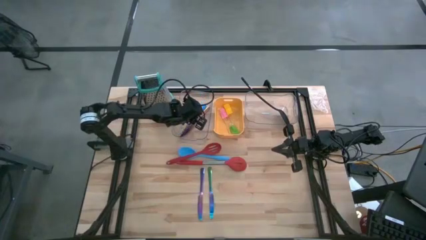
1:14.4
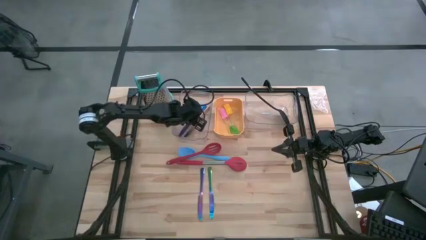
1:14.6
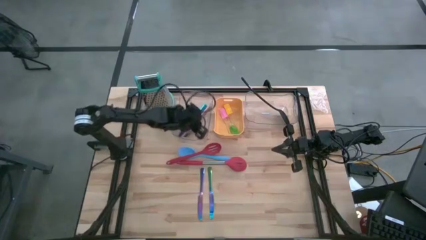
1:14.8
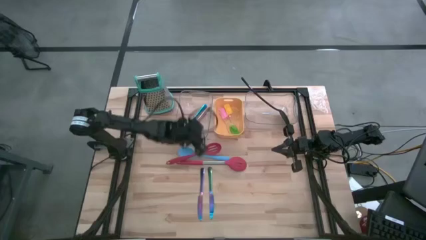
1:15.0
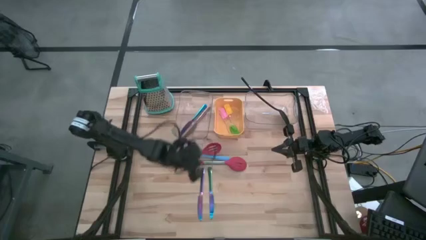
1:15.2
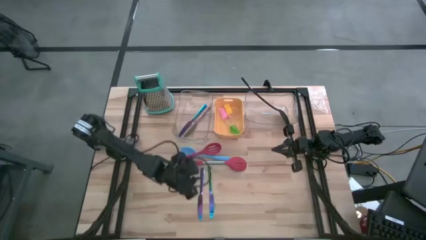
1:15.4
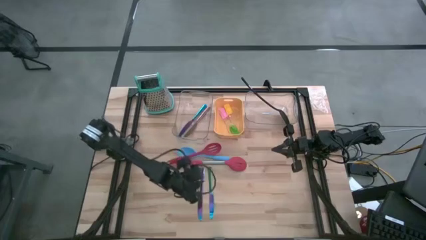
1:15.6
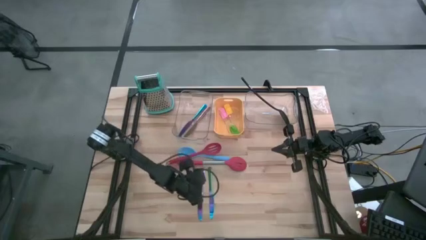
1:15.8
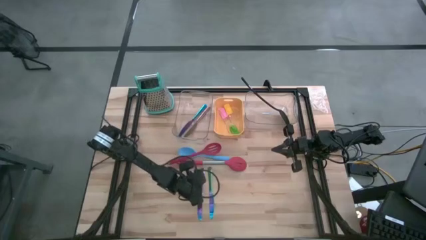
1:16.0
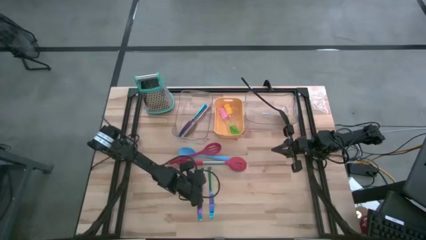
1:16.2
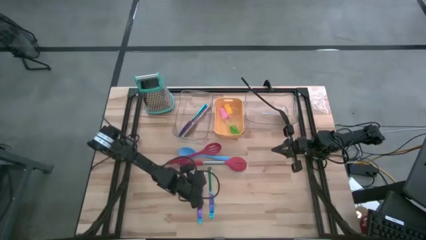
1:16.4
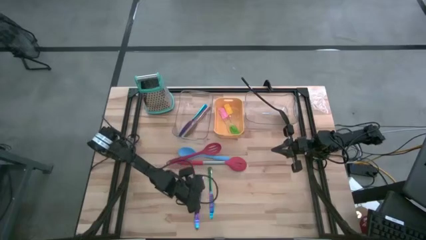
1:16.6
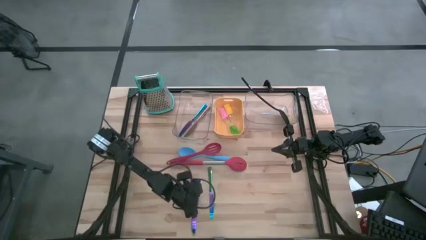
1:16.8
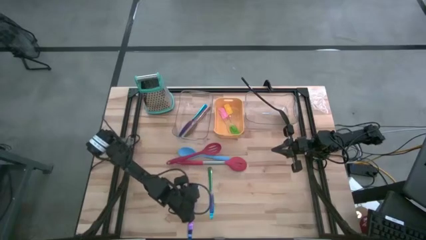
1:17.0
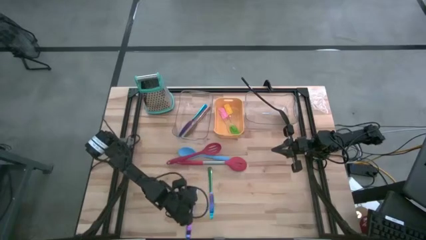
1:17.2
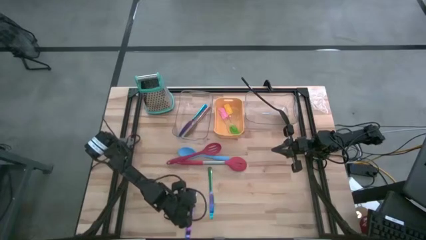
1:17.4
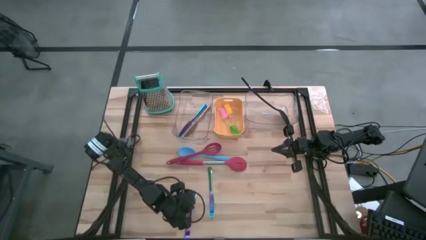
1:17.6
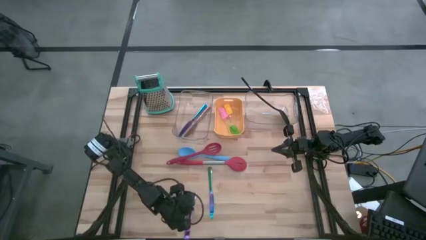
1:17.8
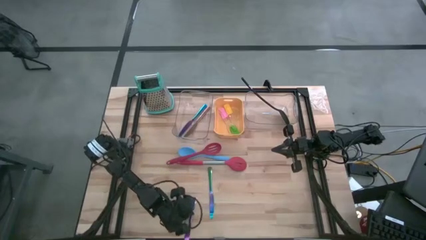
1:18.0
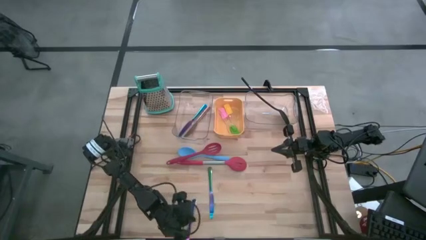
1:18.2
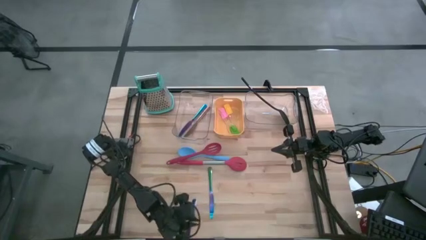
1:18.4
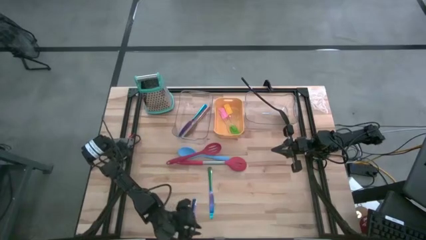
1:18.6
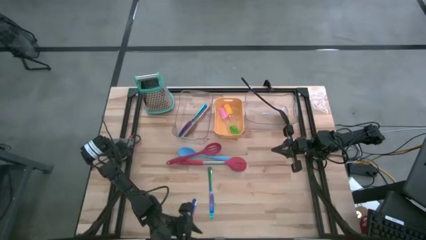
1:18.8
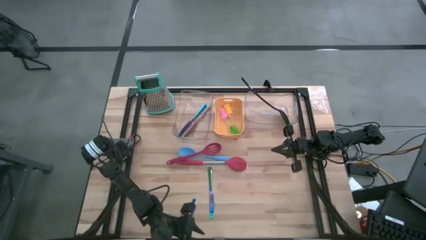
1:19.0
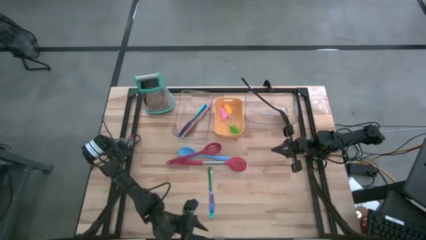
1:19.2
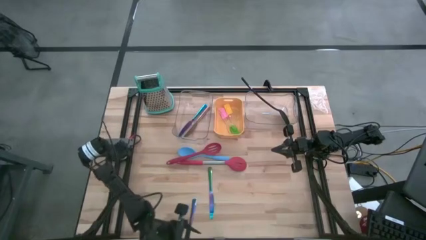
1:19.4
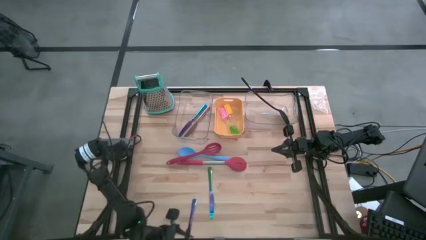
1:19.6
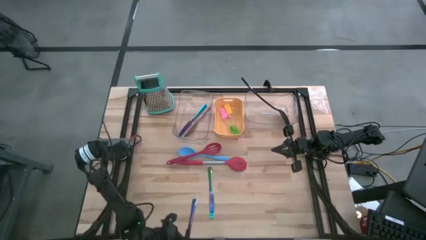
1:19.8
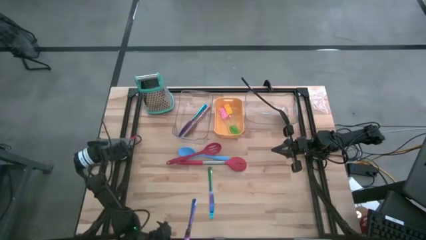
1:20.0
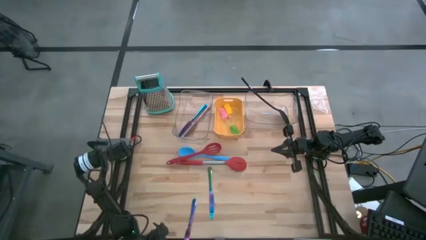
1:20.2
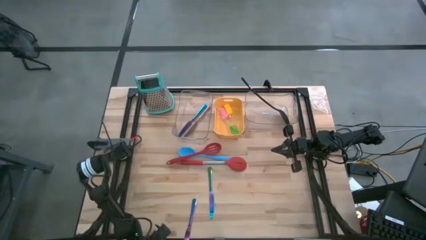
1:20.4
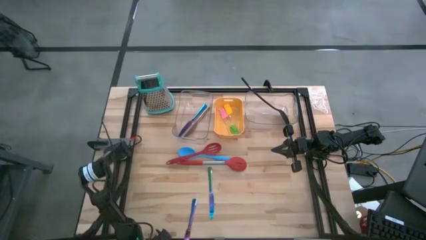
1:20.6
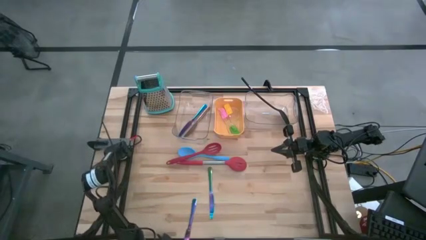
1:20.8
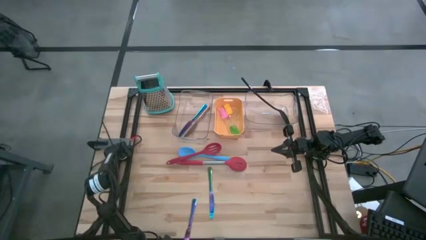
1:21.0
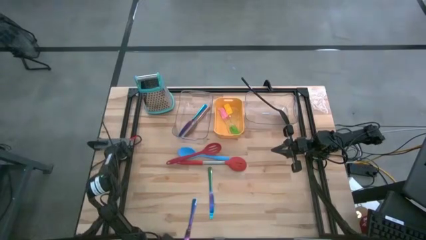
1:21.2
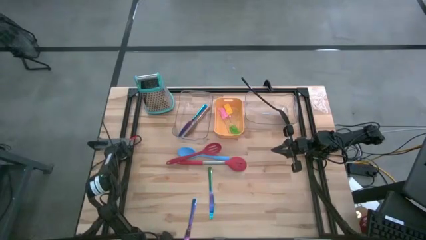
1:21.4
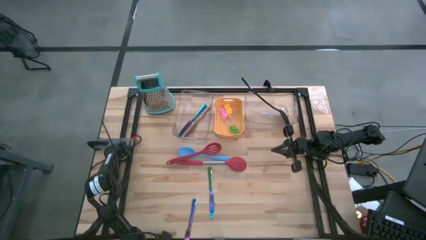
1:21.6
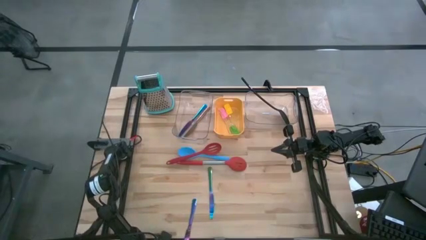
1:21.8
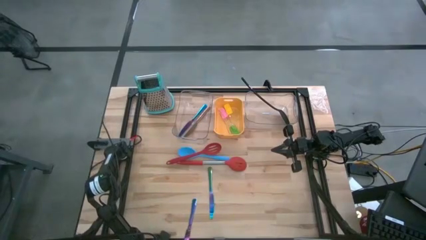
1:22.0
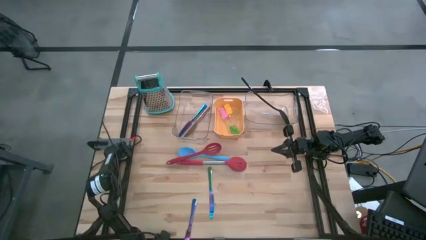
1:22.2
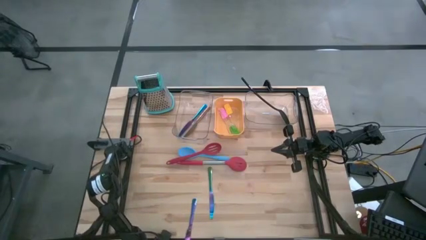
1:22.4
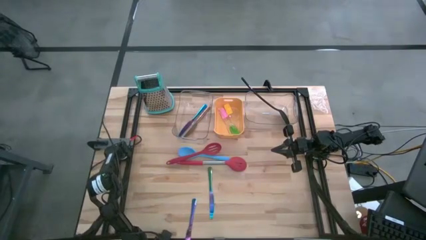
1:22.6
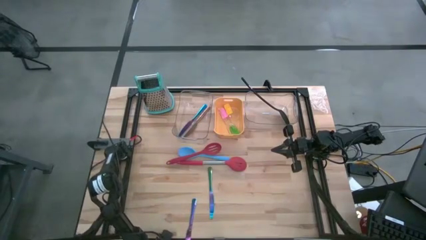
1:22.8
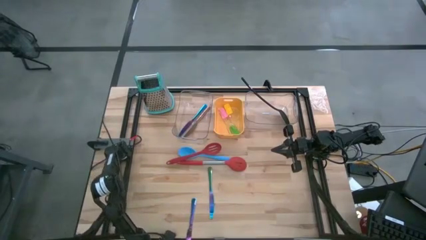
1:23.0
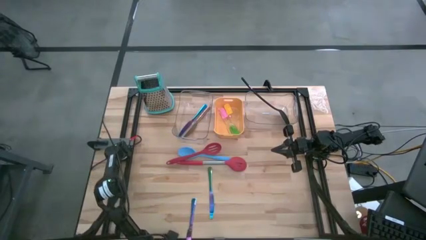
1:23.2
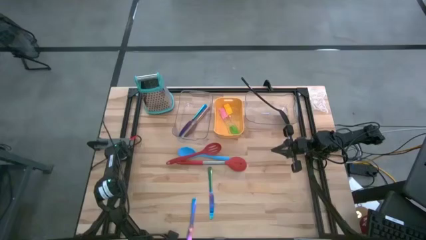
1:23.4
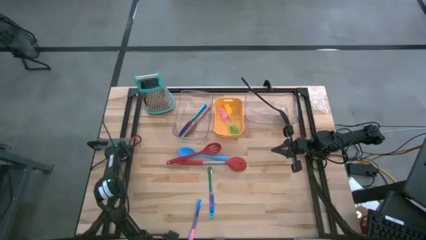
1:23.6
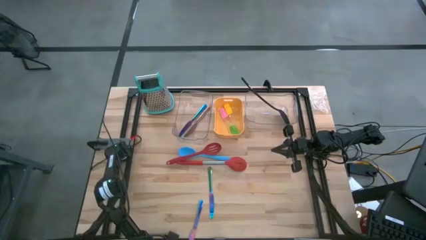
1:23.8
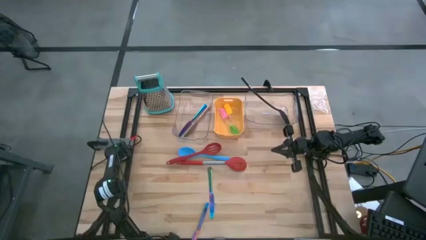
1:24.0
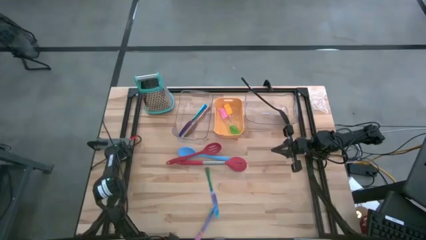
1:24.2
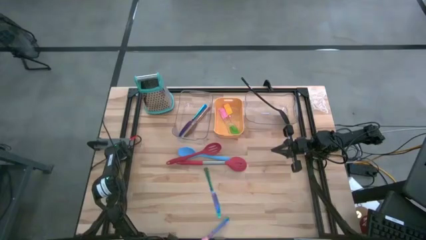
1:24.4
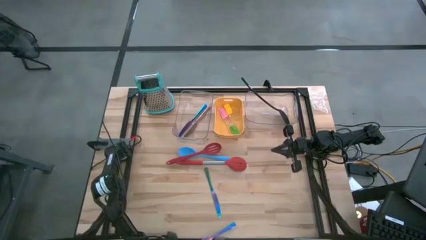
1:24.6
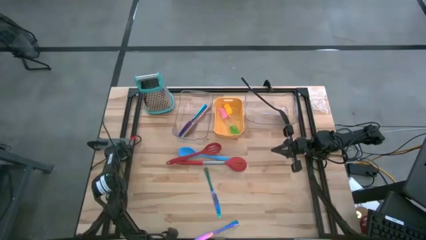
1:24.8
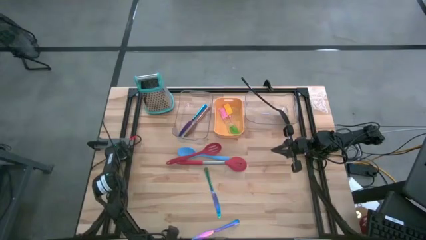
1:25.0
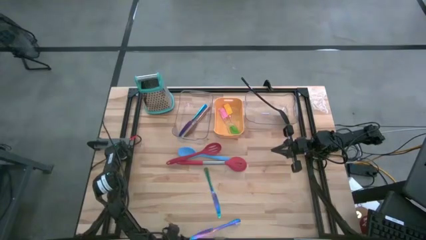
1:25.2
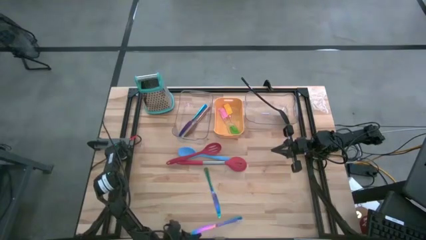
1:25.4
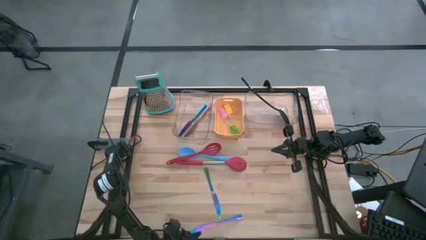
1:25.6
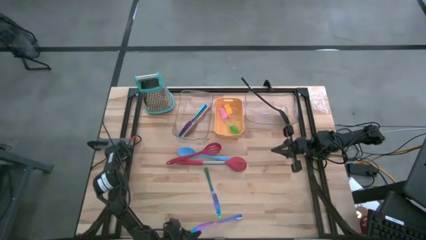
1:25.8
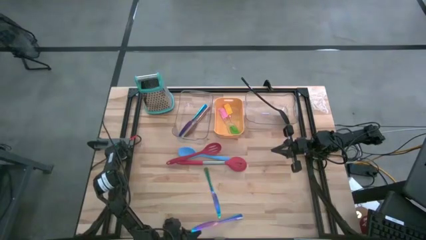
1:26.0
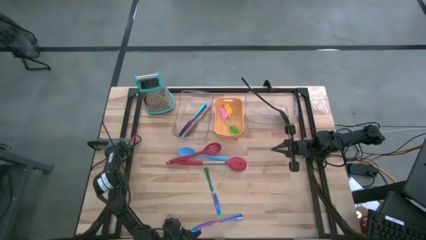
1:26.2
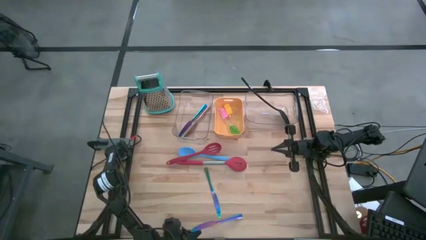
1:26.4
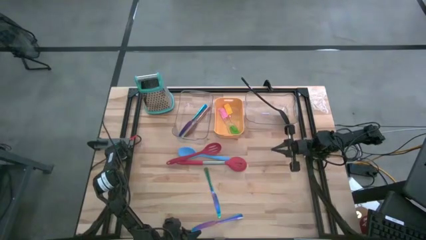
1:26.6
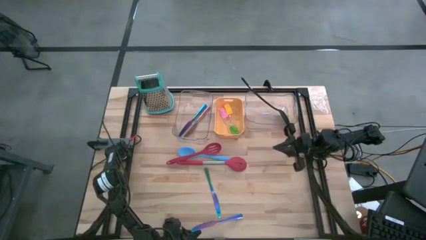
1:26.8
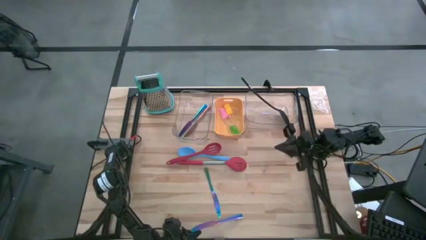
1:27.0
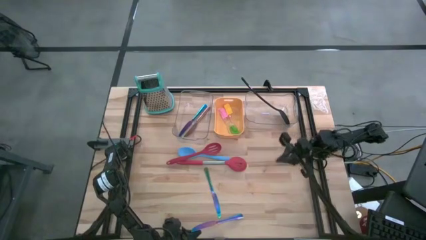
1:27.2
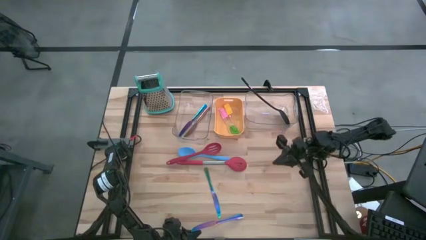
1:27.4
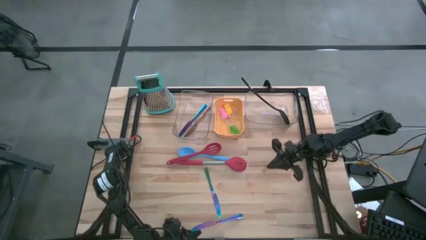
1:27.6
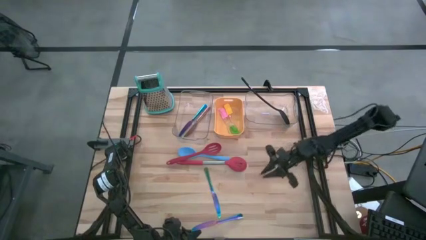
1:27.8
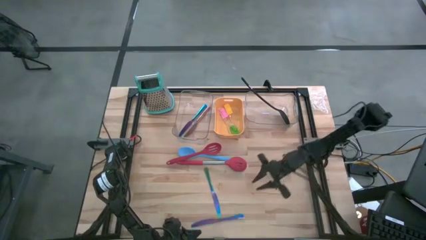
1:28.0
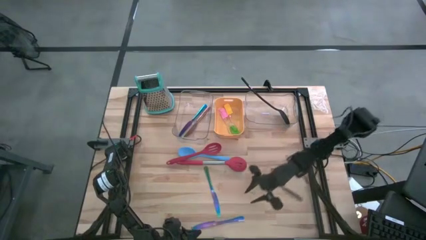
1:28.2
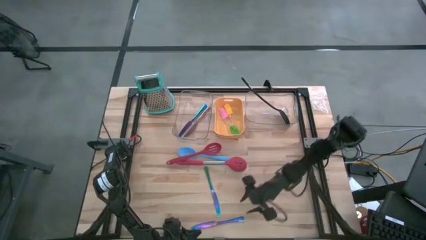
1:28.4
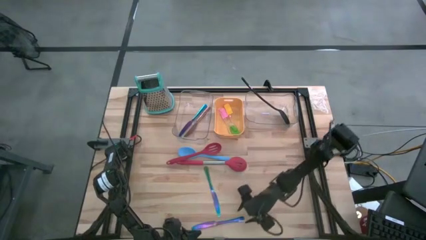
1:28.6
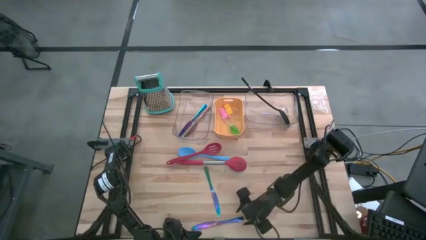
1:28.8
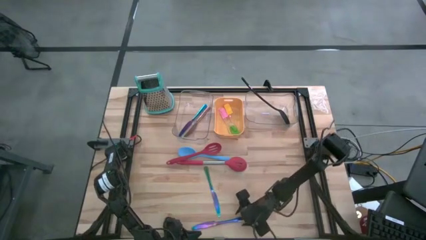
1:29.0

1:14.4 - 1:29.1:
Task: Pick & Place Kitchen Items
Put the left blue knife into the left transparent bin
